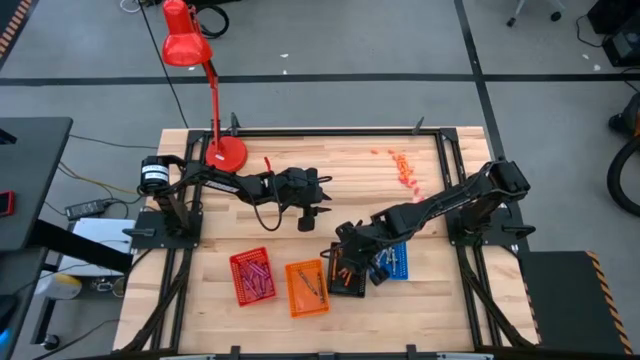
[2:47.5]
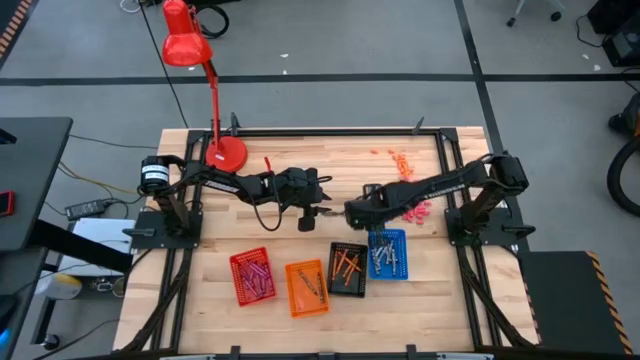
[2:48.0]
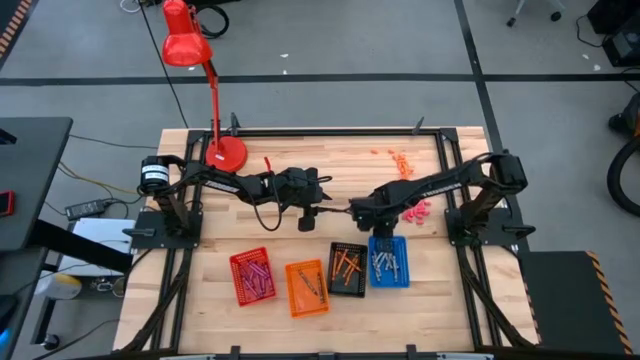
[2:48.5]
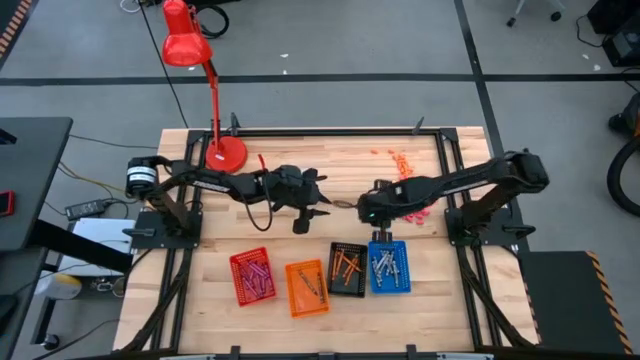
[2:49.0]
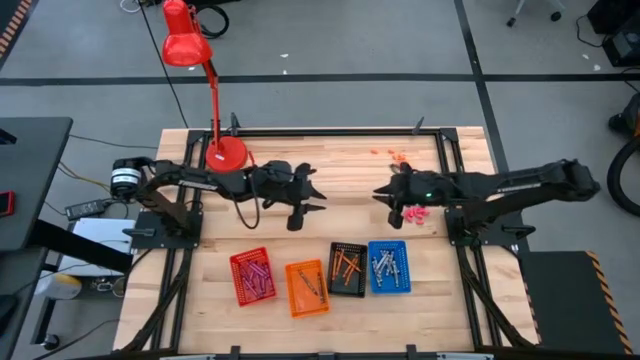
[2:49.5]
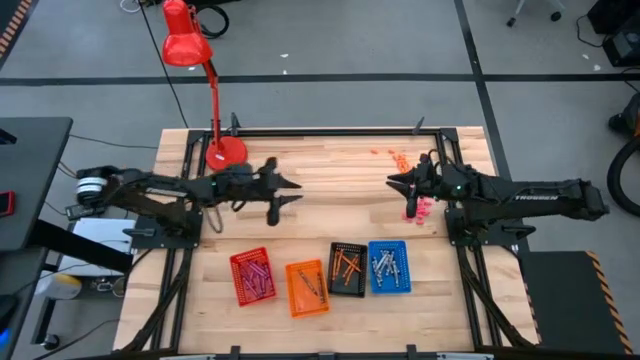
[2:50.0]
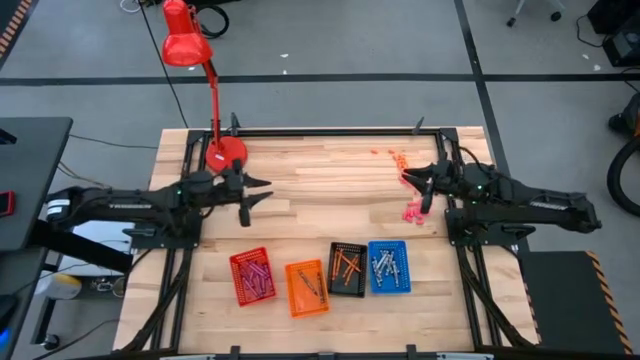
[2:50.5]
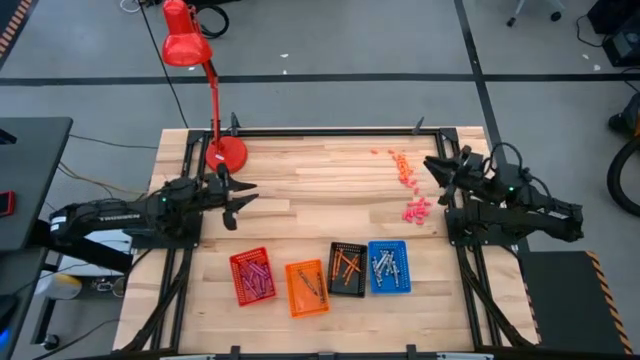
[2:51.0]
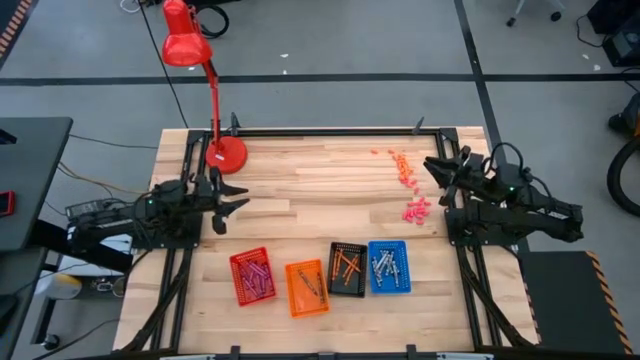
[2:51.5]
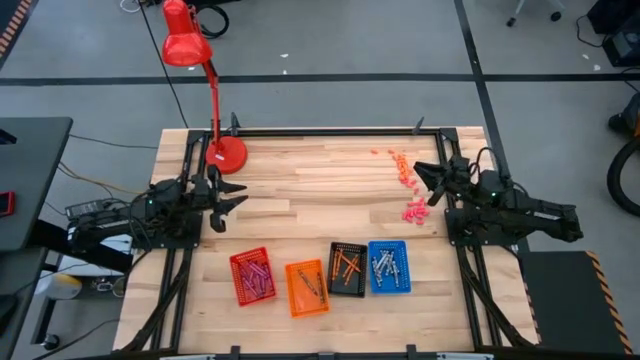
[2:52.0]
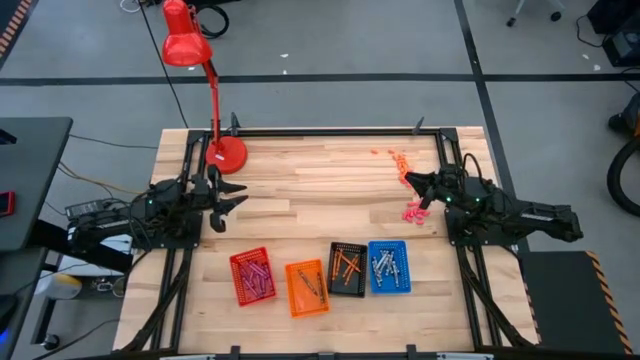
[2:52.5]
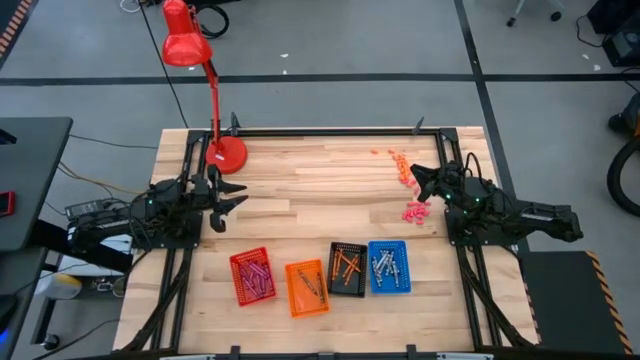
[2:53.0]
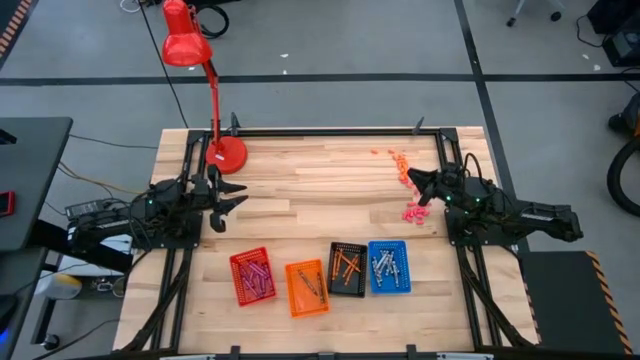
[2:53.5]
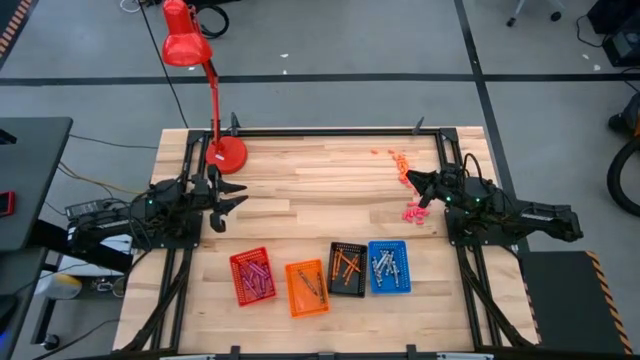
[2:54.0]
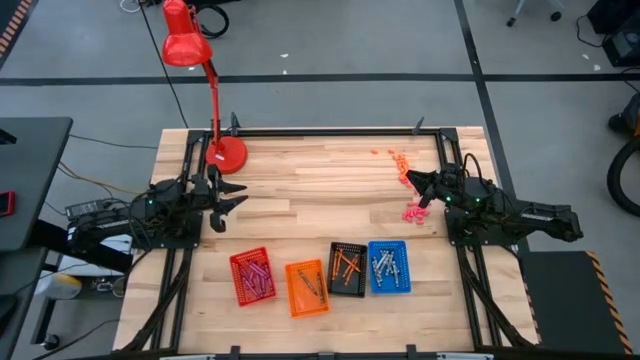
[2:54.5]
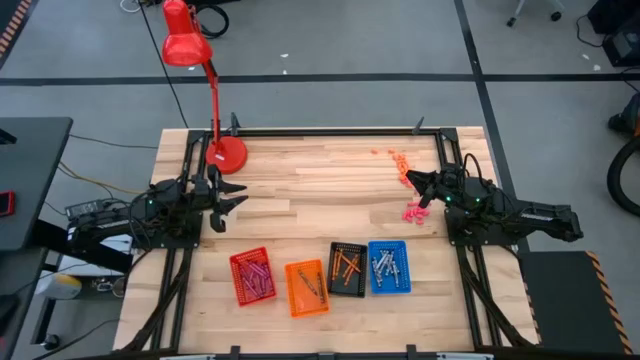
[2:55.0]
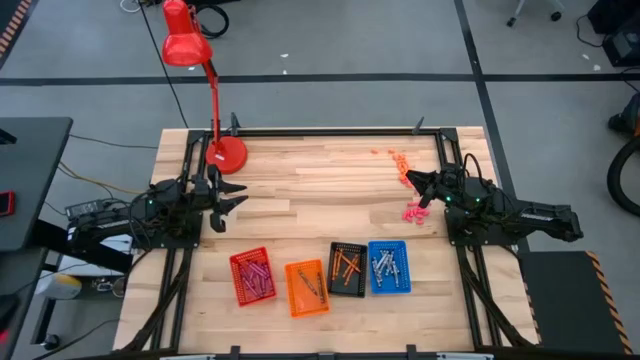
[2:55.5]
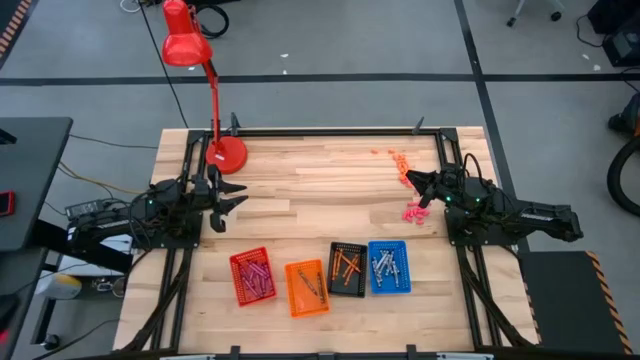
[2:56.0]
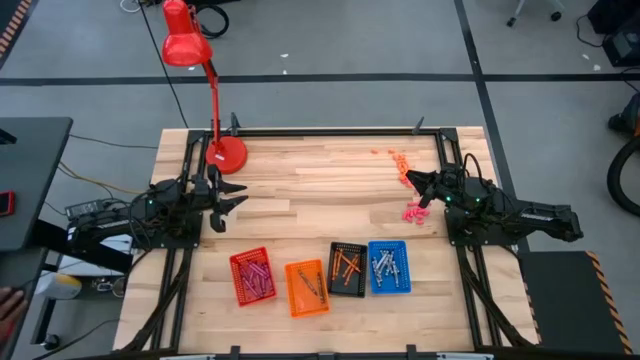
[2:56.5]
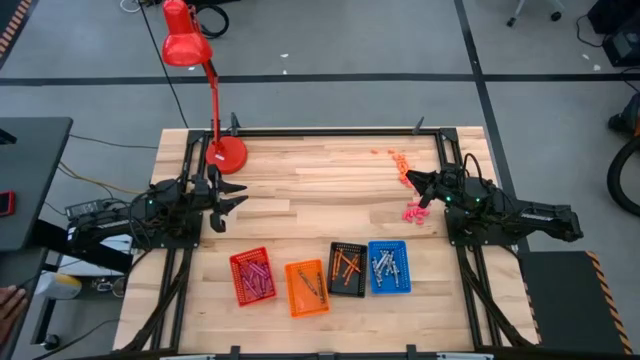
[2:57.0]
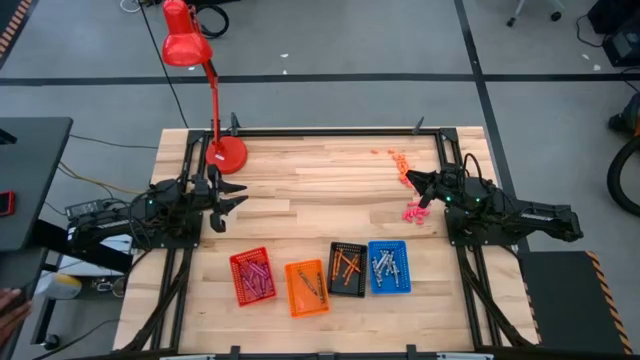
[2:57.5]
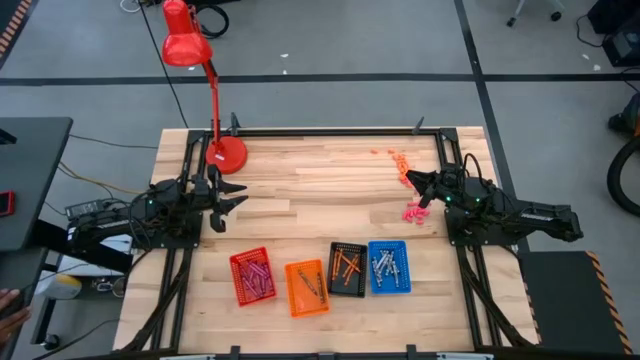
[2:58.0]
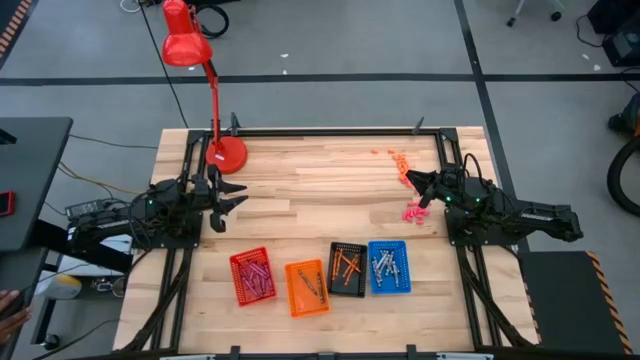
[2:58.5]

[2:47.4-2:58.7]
Task: Sort crayons
Return to Home Position

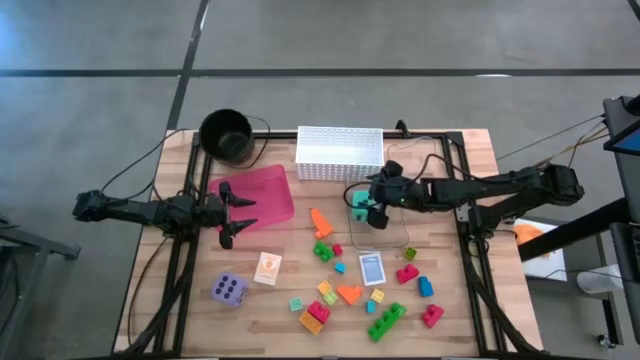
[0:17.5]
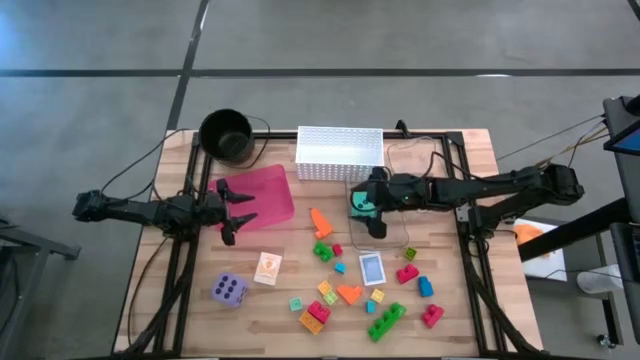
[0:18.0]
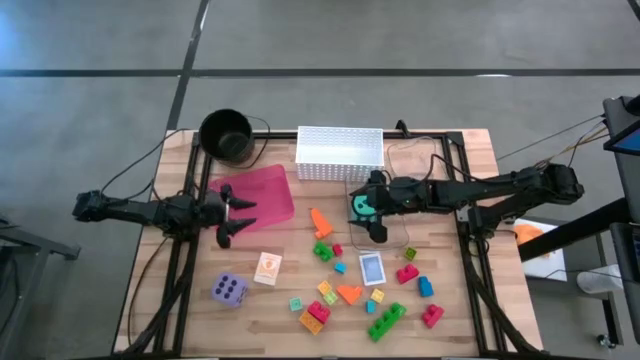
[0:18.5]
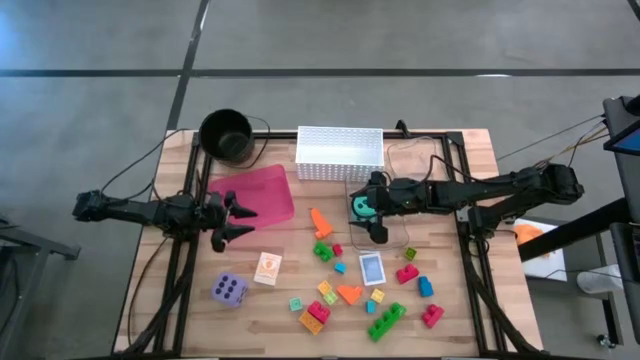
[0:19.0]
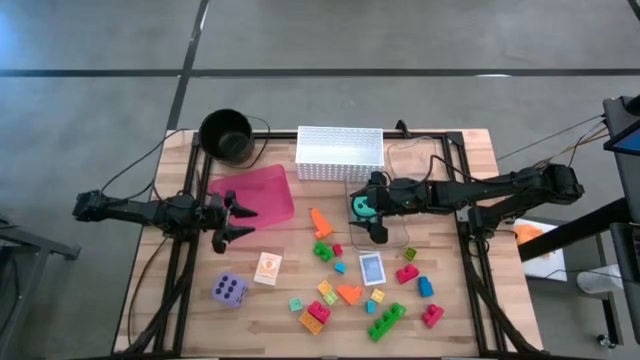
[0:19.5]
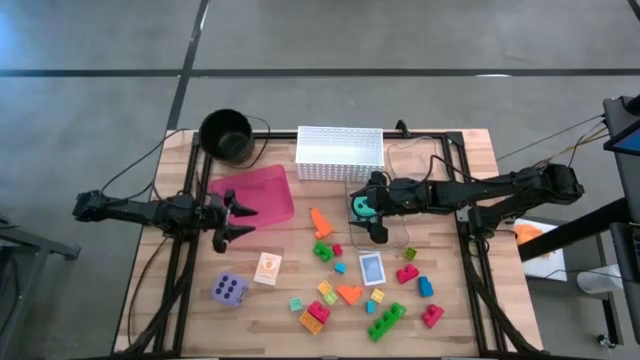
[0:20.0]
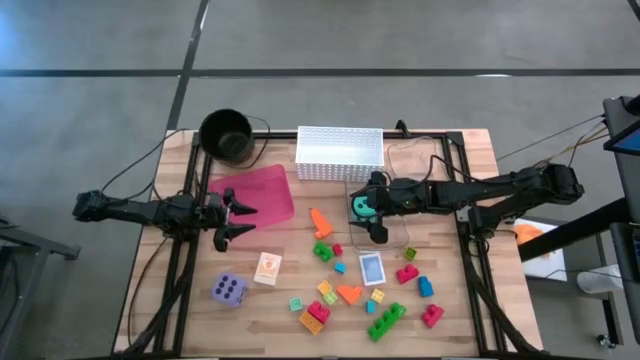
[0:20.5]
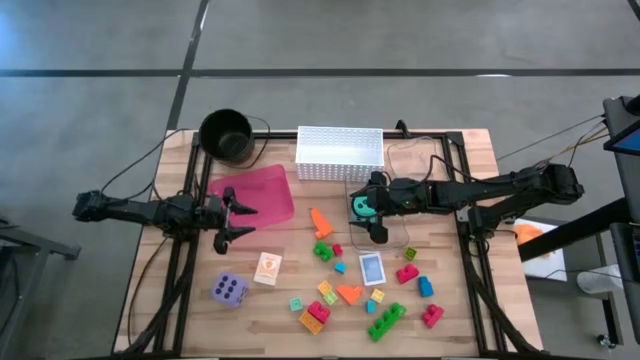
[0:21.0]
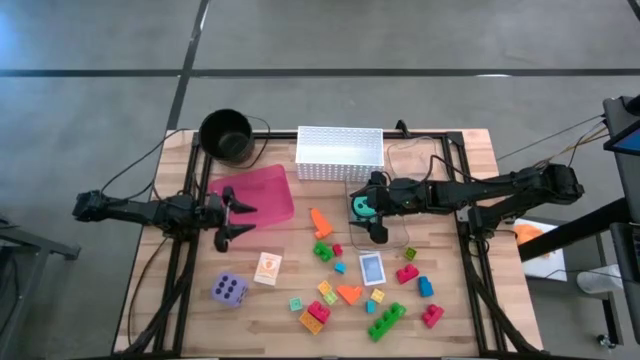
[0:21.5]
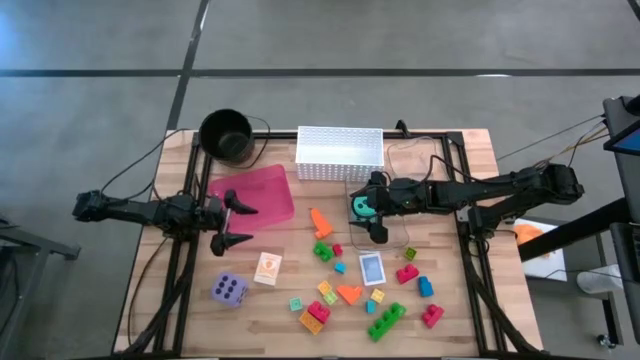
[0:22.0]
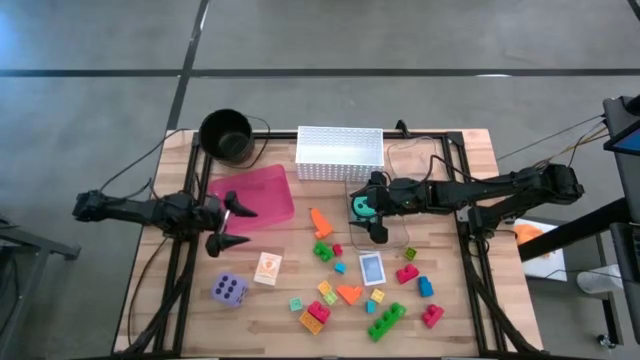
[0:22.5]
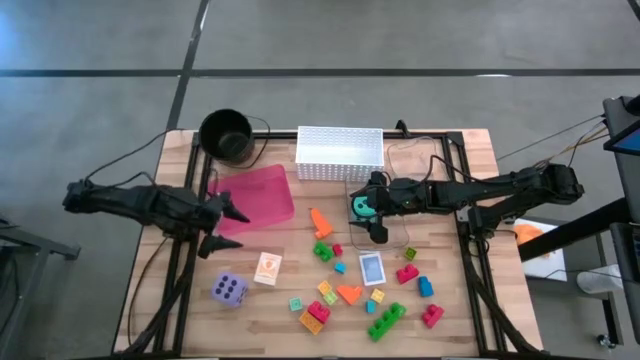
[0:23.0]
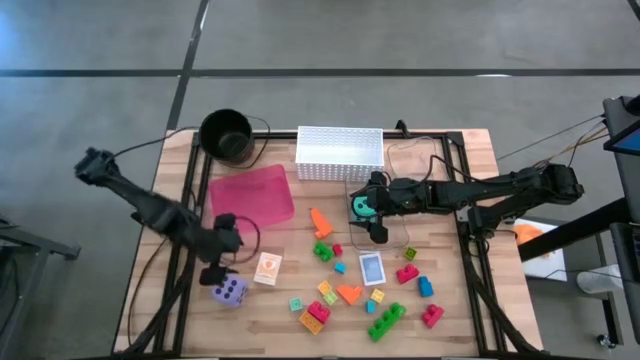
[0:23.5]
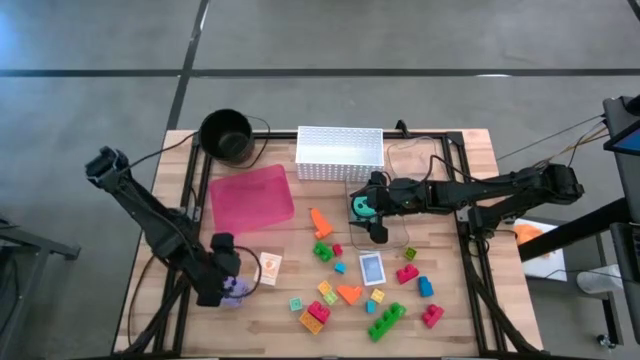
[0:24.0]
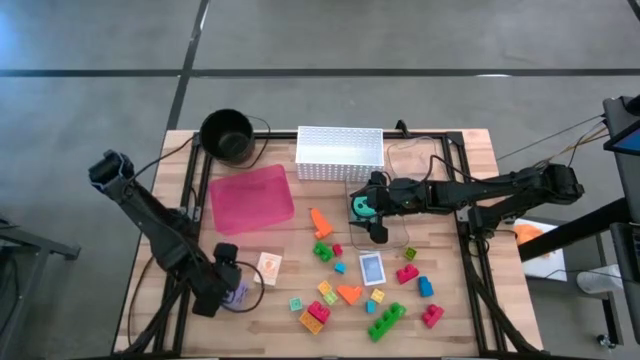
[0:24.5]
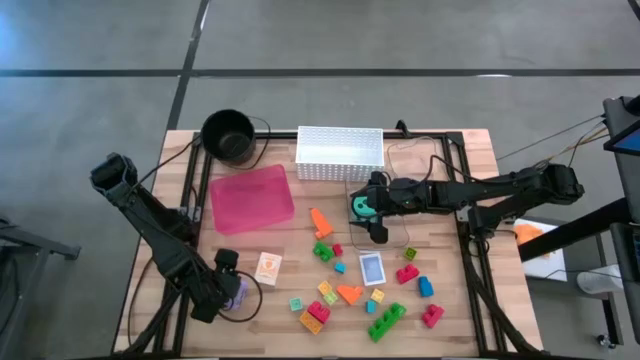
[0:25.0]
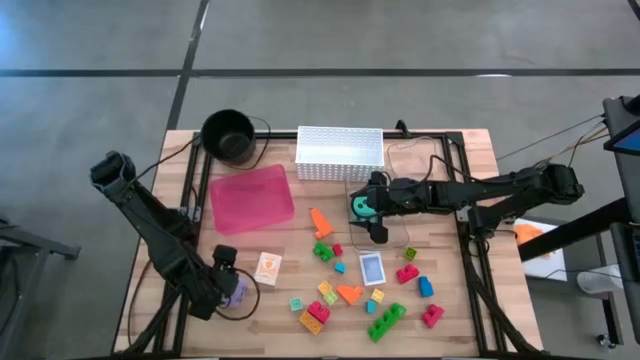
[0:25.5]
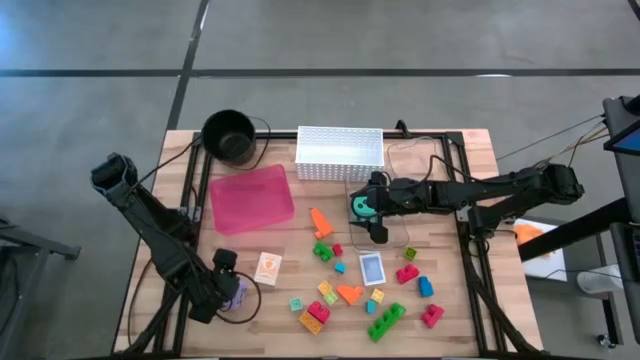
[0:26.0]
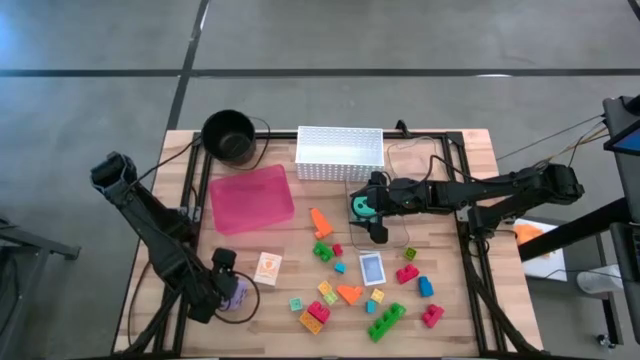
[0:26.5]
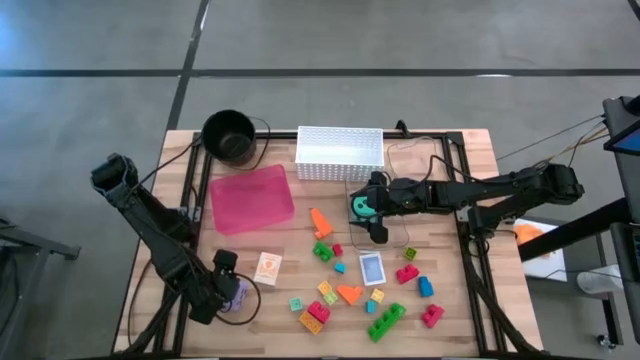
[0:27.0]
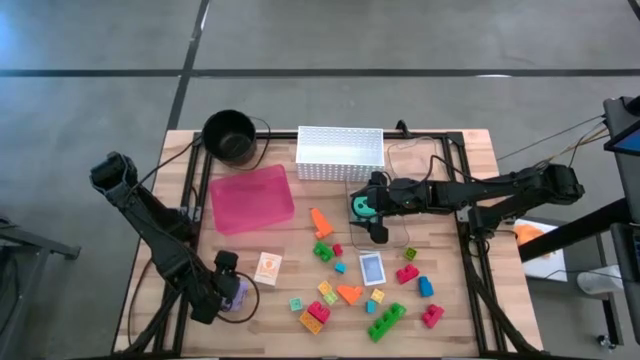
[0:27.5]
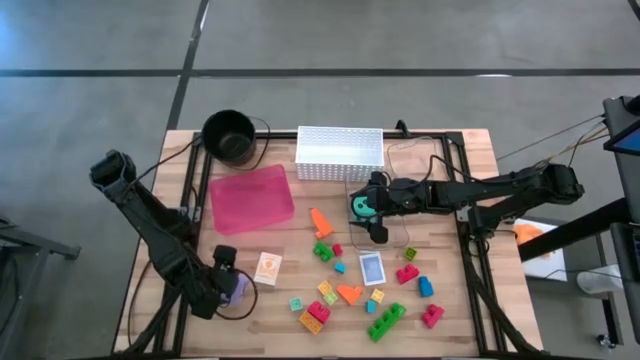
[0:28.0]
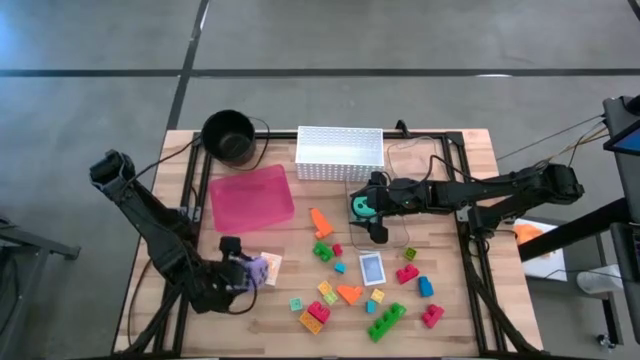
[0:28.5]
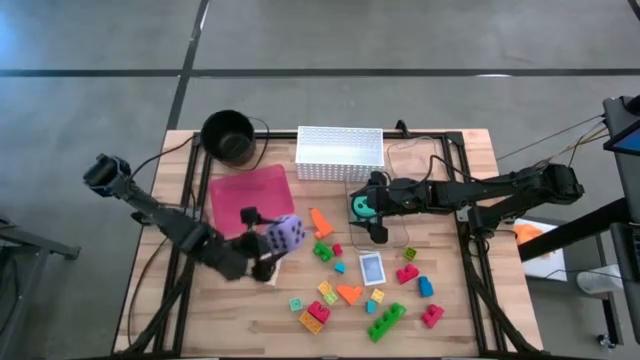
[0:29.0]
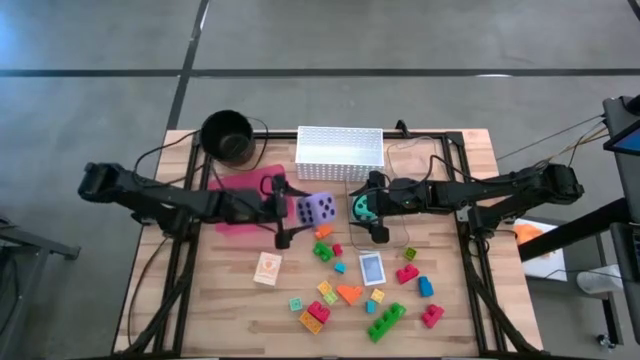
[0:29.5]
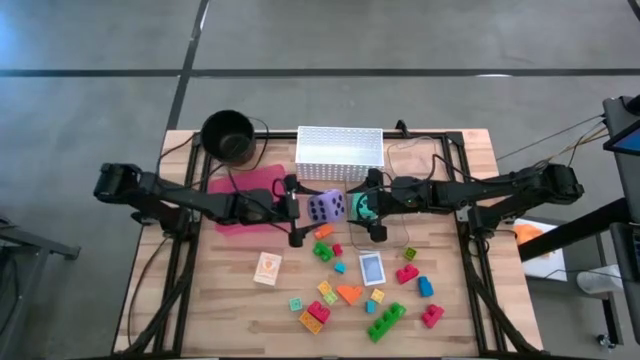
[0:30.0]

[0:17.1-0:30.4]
Task: Pick & Place Toys
Put the purple dice into the left transparent bin
